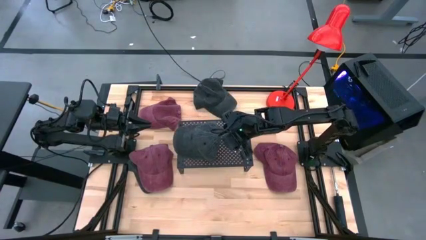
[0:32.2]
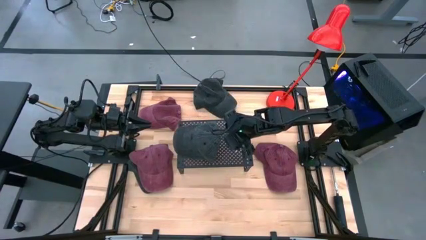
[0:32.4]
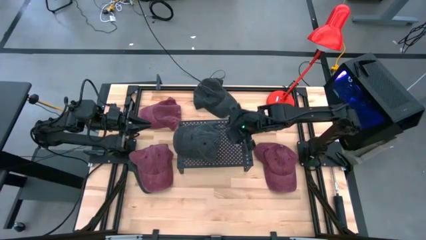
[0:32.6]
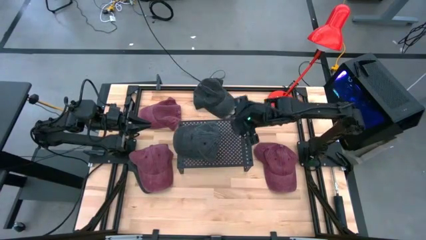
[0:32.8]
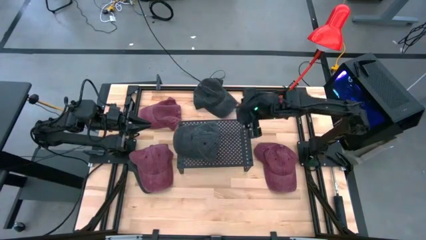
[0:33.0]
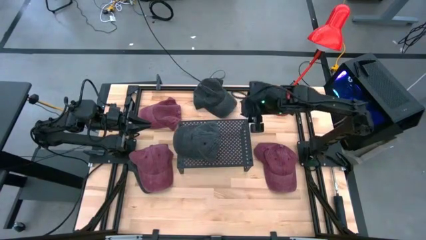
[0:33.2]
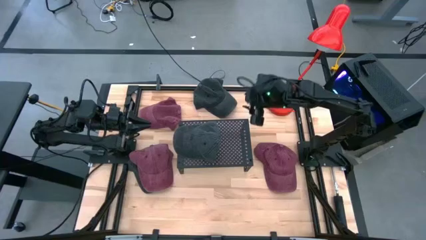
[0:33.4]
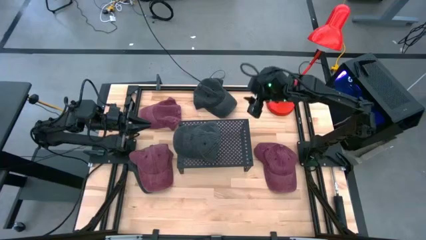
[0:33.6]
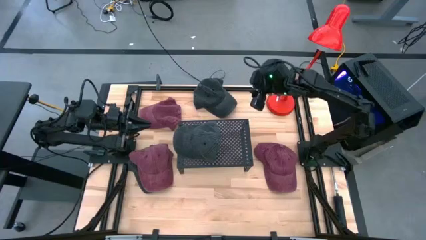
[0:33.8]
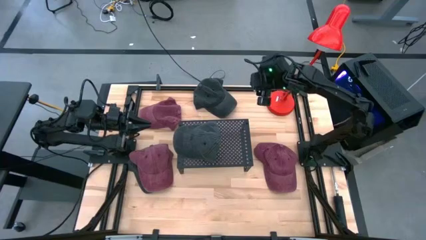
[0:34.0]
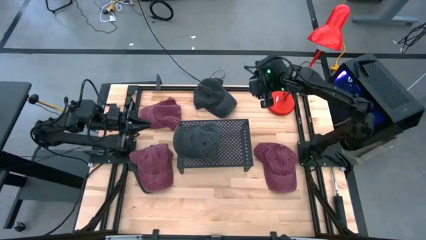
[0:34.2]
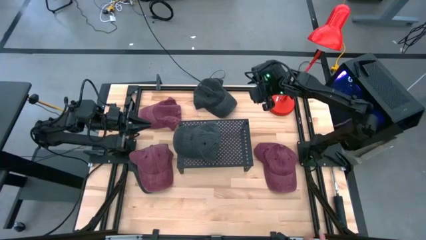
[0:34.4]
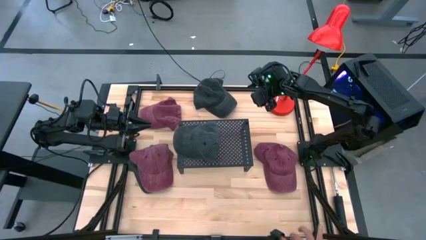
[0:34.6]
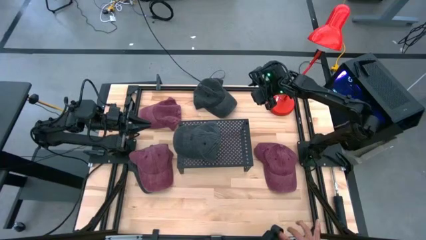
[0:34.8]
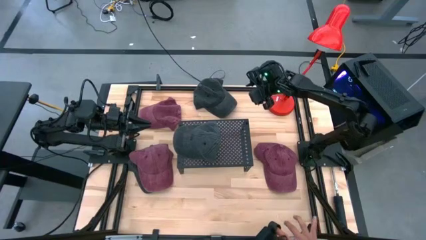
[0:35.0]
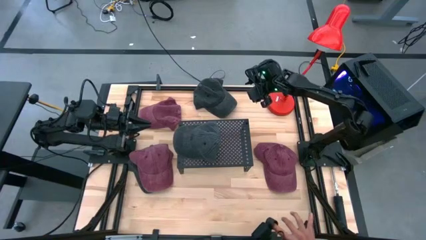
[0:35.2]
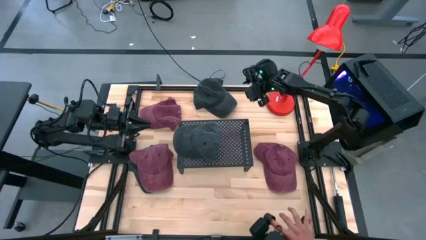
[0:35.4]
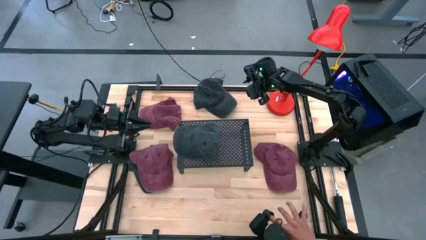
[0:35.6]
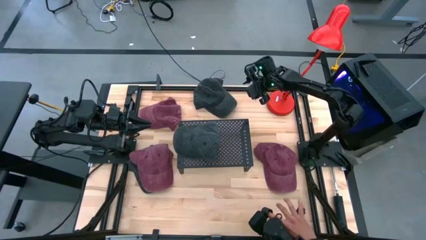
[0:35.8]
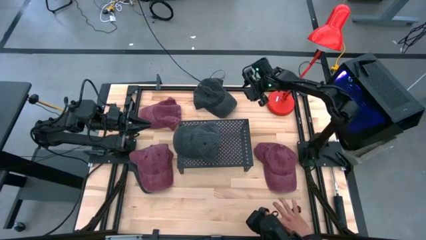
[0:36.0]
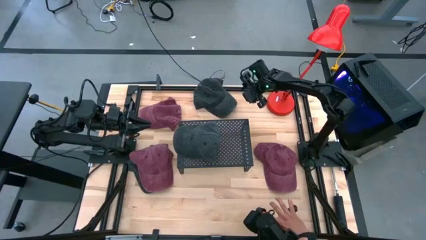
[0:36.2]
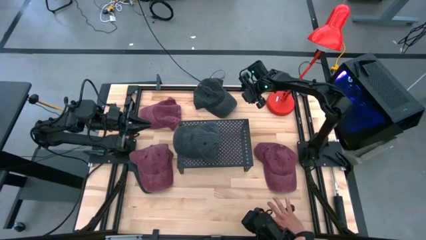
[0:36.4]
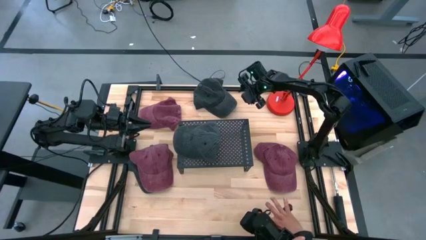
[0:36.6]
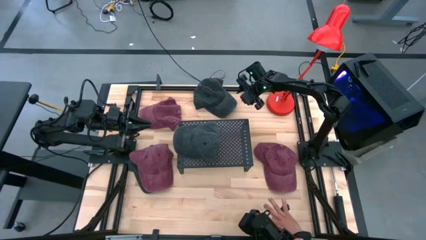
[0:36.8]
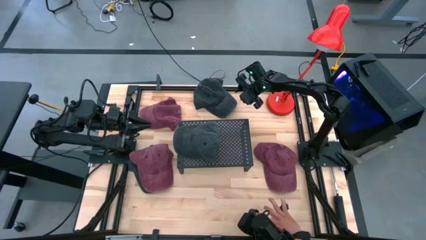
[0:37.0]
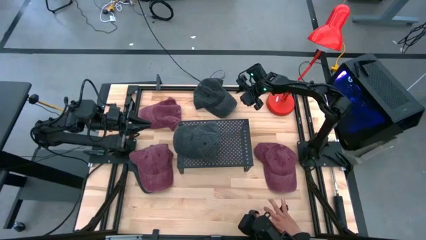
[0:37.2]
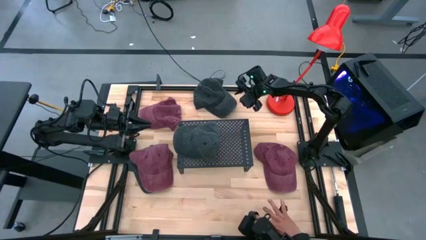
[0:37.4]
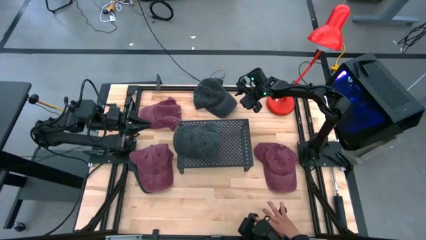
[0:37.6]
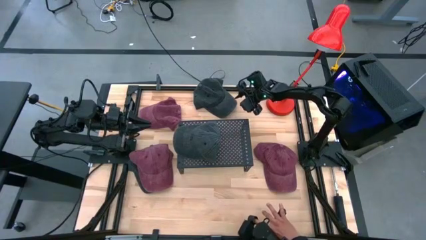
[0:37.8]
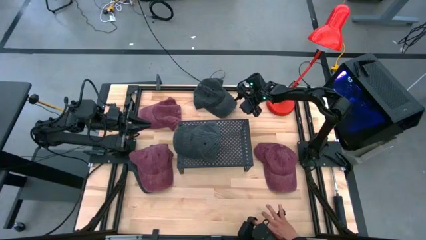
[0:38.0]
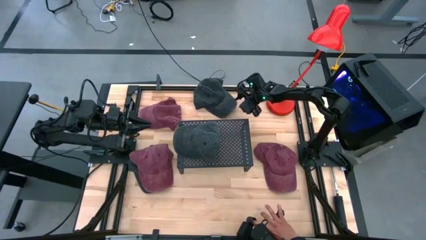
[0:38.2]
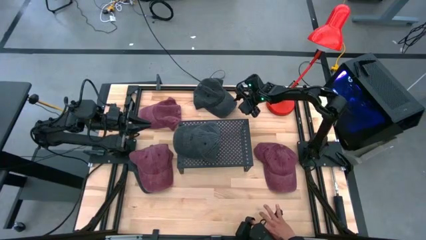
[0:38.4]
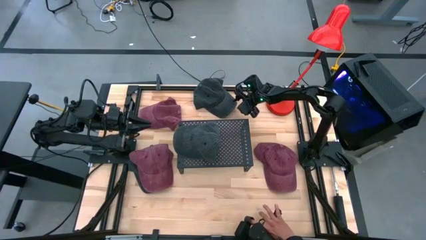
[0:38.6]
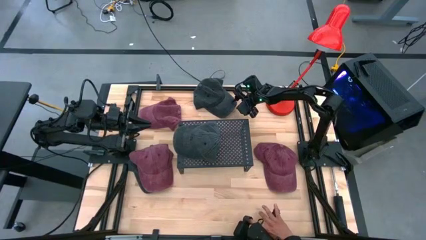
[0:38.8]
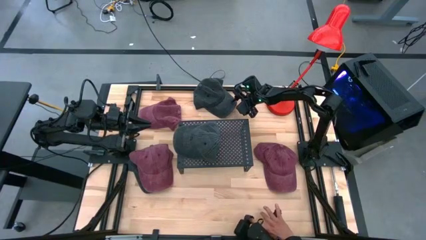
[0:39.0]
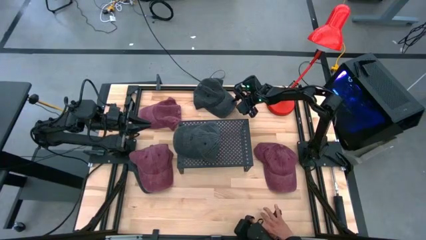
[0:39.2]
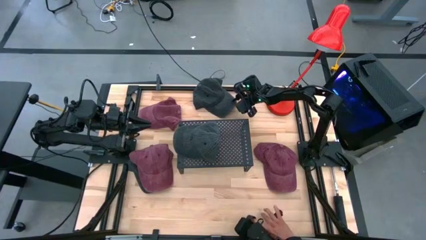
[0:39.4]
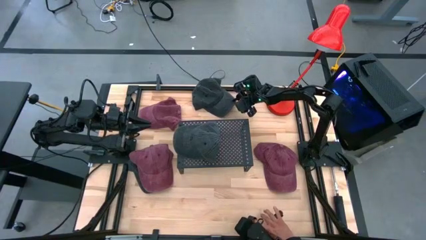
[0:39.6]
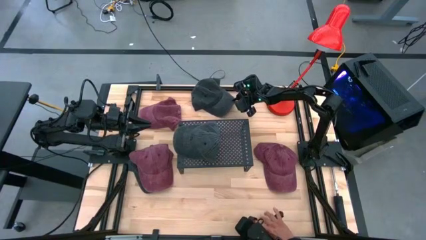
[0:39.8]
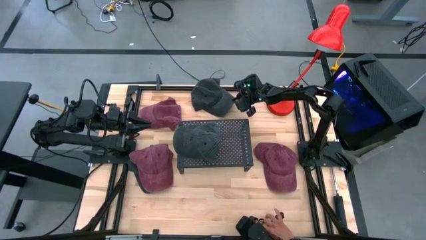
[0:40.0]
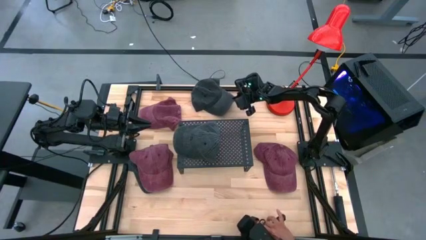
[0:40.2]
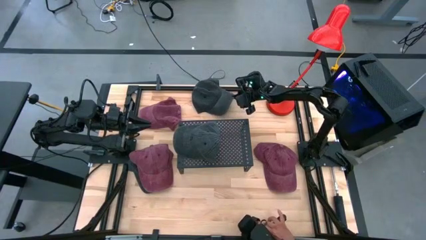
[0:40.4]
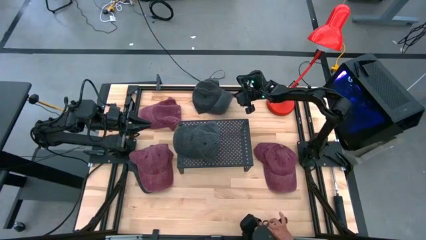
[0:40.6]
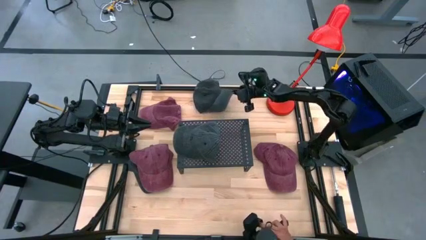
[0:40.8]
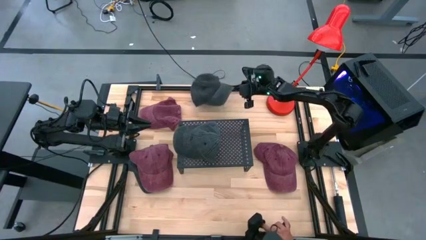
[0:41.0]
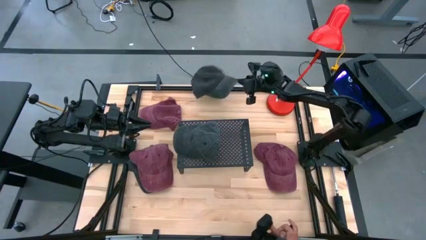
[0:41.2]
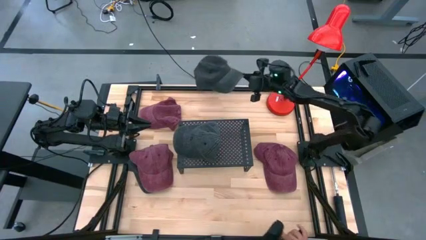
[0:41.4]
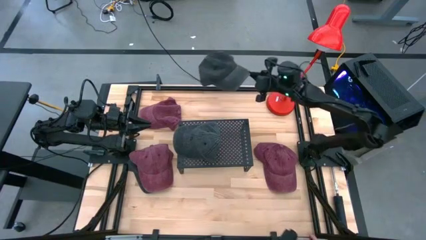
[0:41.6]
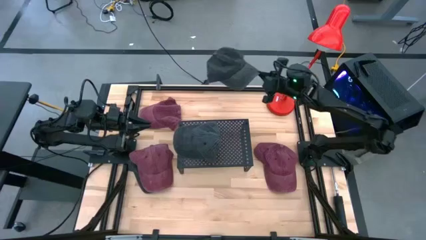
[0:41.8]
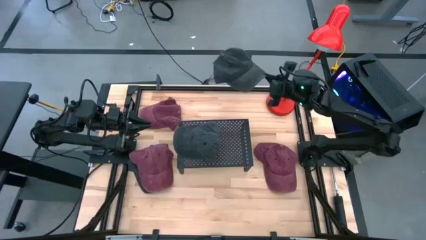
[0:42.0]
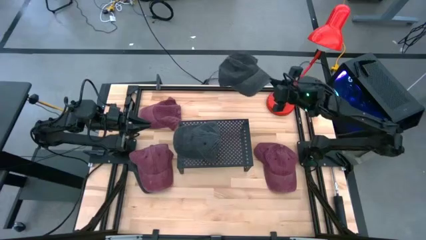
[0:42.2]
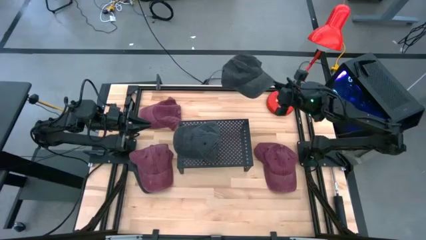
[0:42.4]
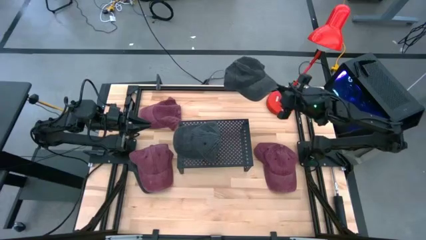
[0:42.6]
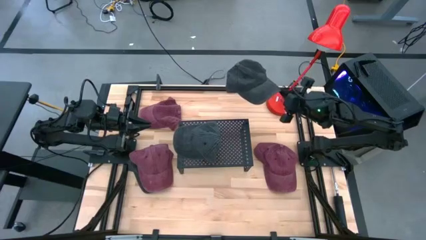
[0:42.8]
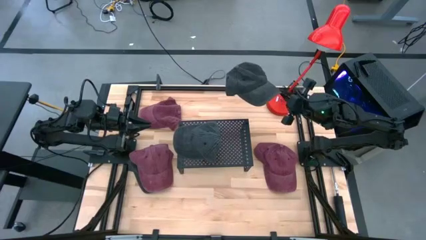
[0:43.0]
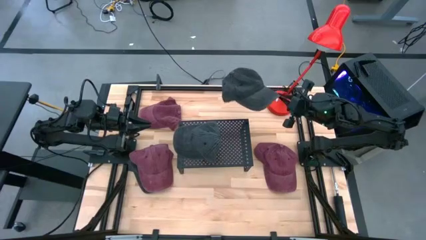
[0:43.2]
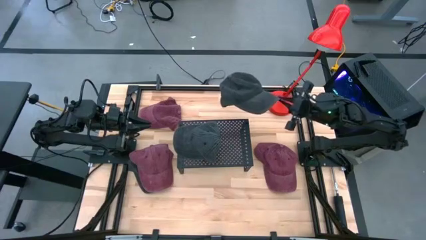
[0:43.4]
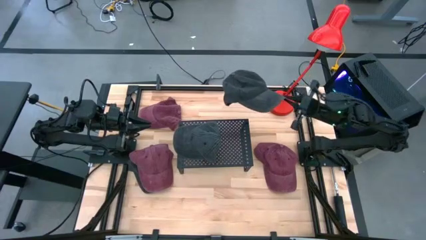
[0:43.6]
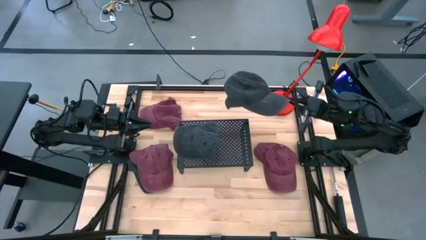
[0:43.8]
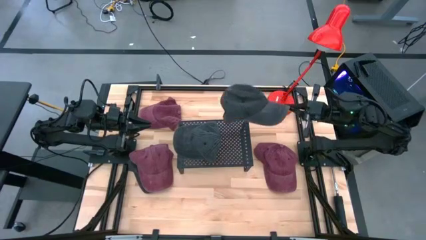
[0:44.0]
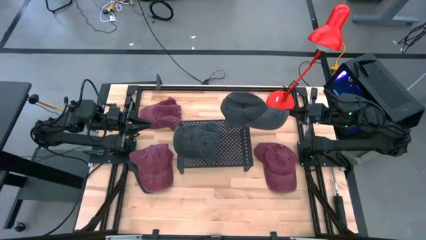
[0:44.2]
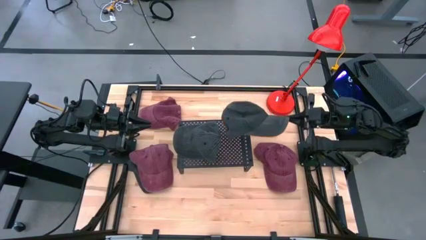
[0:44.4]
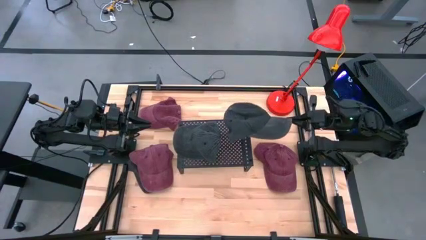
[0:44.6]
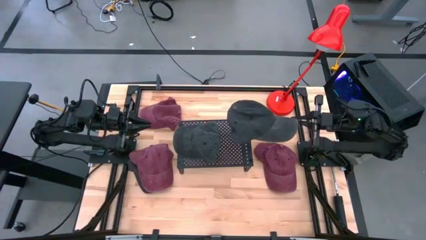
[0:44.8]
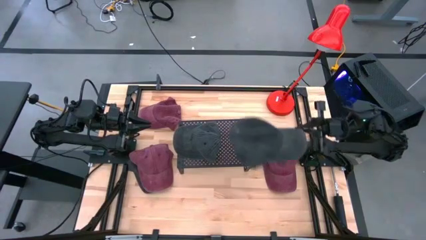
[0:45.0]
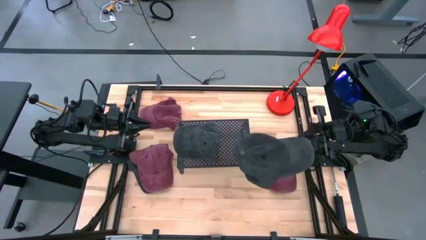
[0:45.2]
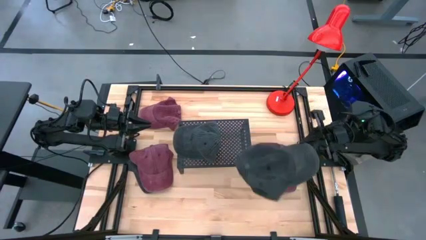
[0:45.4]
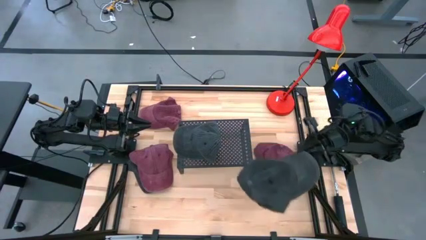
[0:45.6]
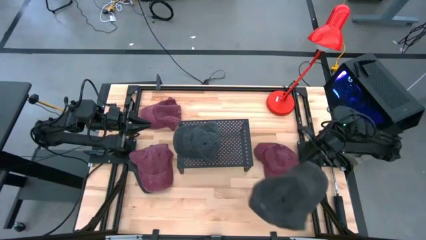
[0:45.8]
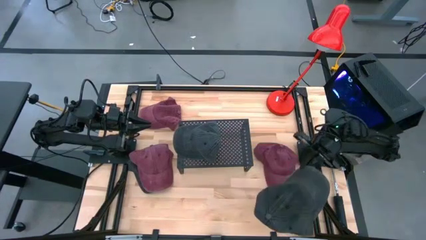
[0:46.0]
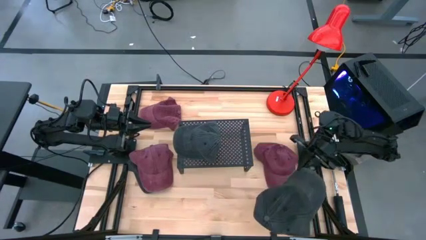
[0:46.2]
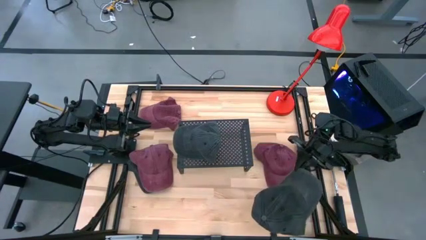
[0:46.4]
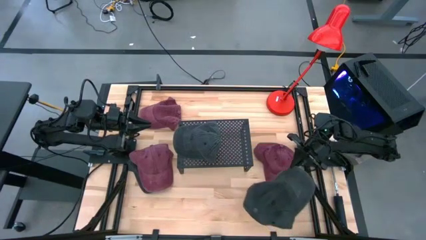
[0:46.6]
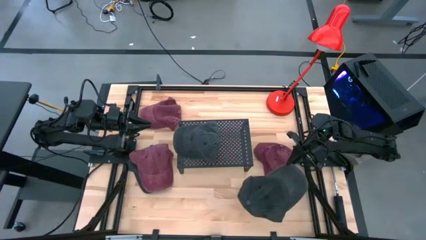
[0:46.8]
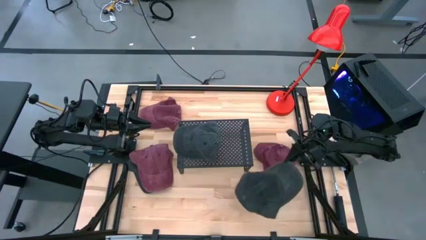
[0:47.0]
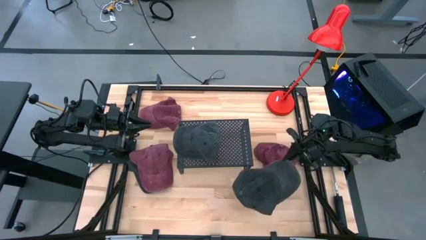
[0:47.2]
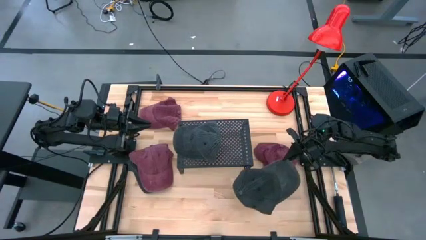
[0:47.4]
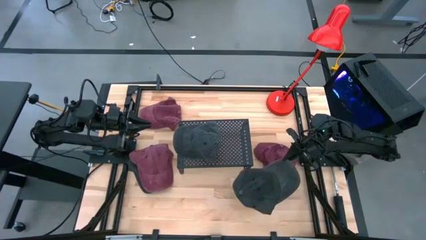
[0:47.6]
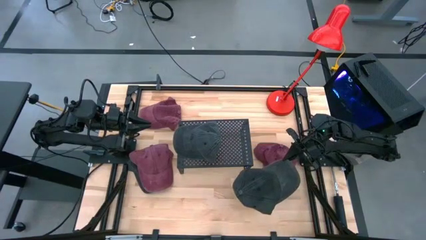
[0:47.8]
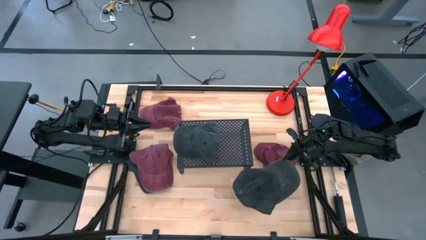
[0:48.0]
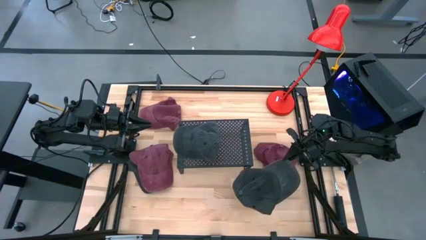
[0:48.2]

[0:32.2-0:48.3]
Task: Pick & Place hat
Stack the top black cap on top of the black cap on the shelf

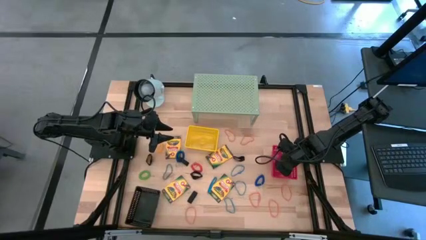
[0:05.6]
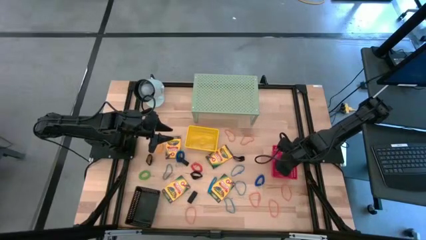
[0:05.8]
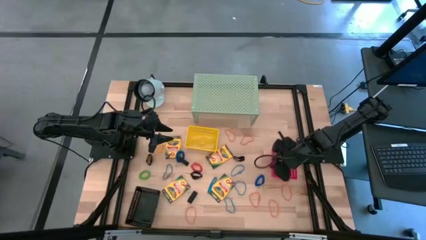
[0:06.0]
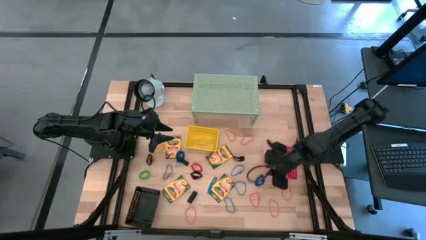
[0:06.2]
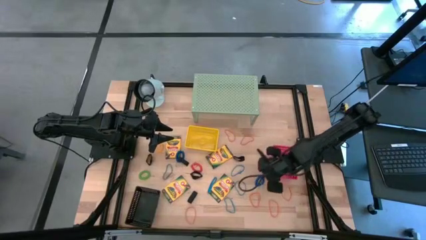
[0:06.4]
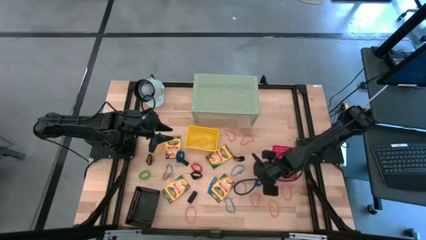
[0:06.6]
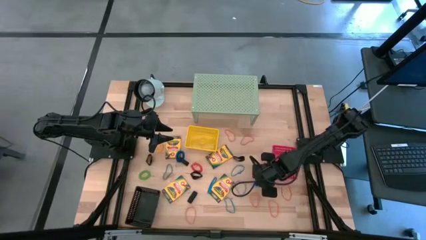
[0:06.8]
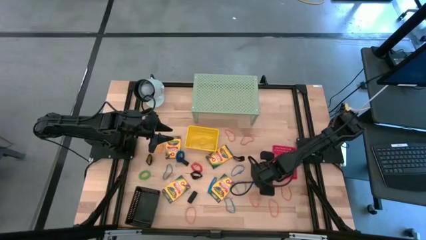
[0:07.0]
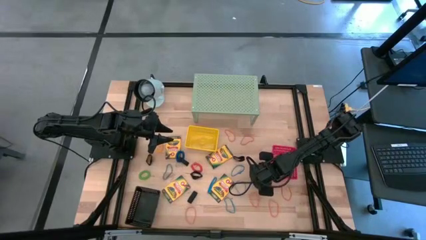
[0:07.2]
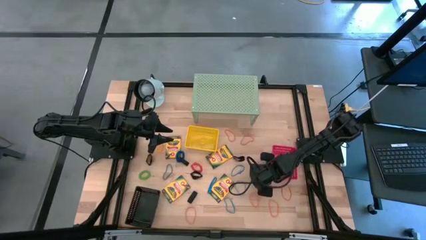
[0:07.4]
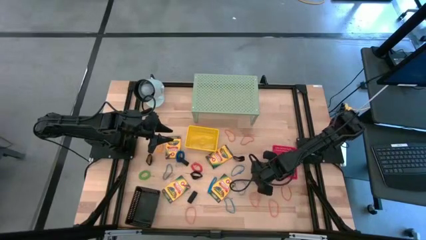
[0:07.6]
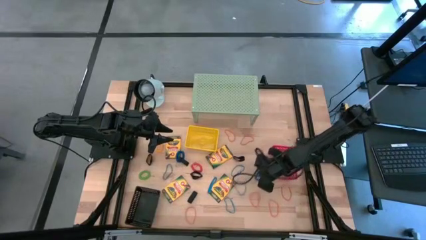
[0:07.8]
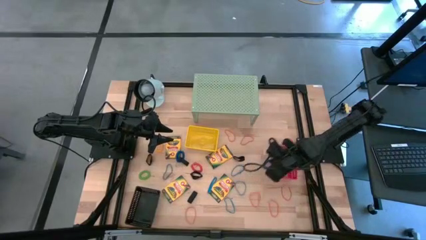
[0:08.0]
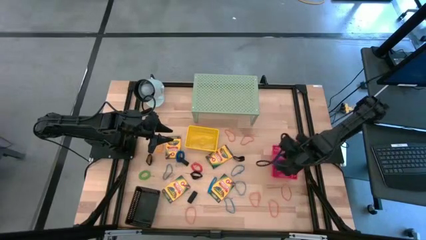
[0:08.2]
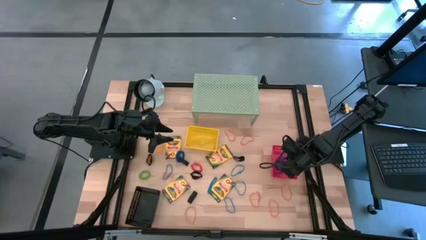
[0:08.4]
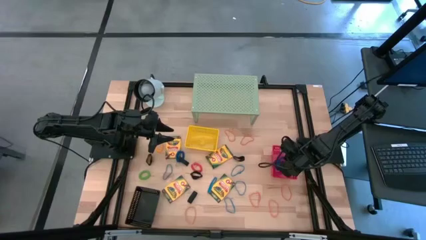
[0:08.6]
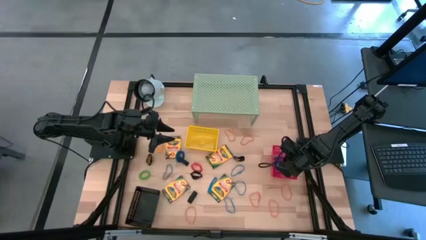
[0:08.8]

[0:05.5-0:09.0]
Task: Pick & Place Office Desk Supplies
Put the blue spring keychain into the red bin
